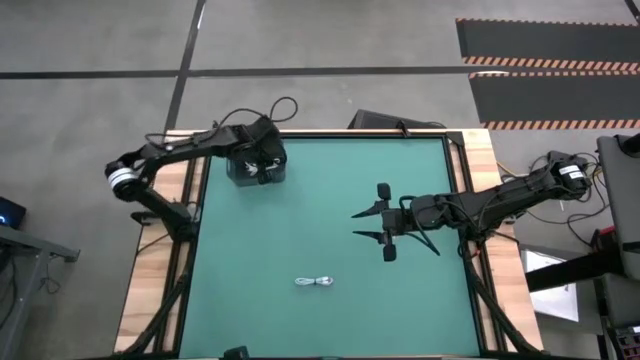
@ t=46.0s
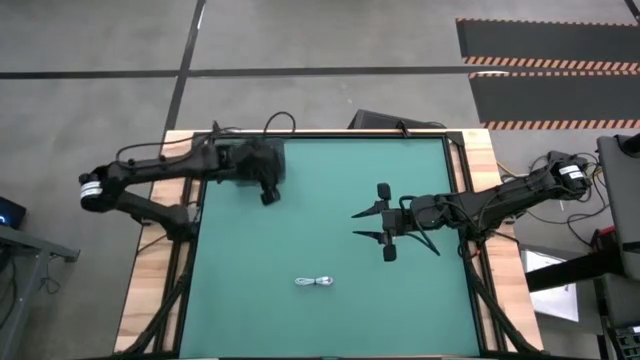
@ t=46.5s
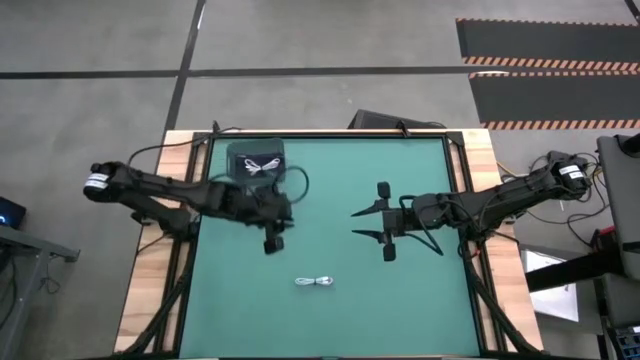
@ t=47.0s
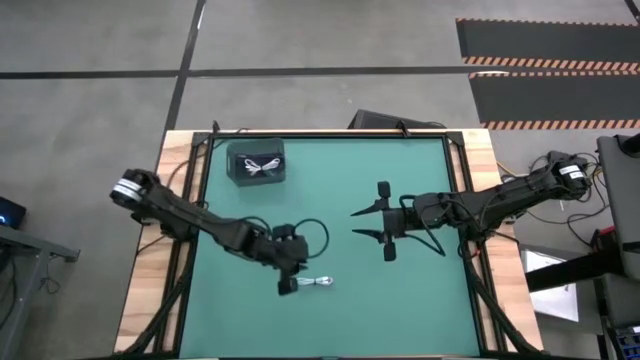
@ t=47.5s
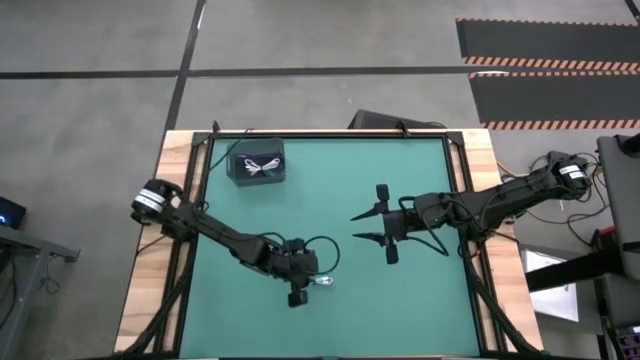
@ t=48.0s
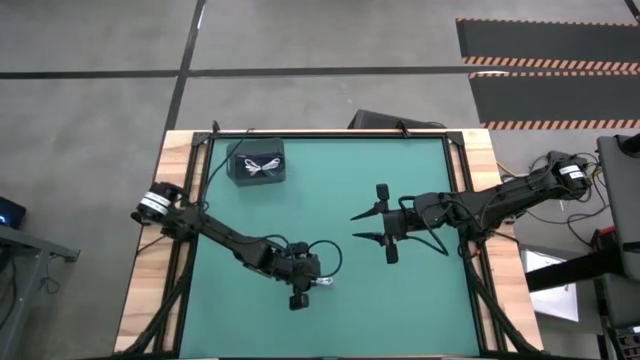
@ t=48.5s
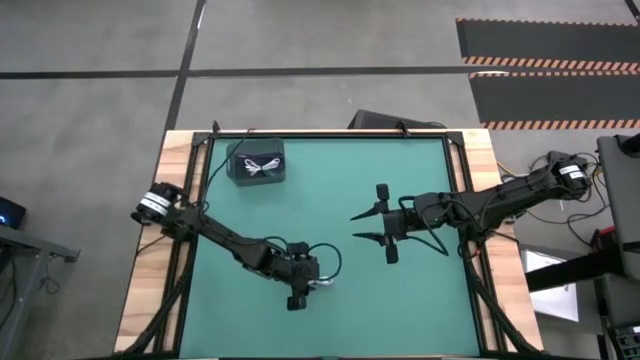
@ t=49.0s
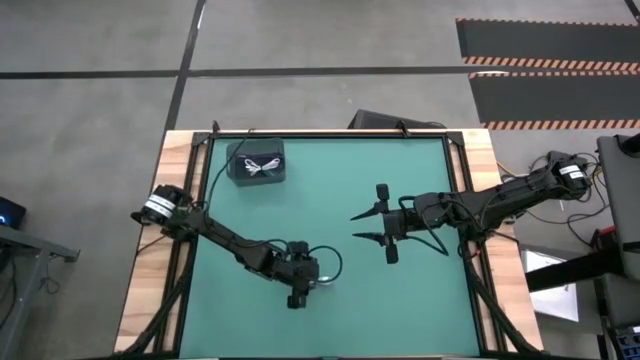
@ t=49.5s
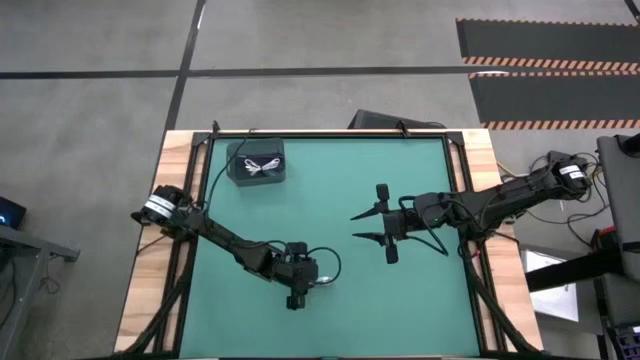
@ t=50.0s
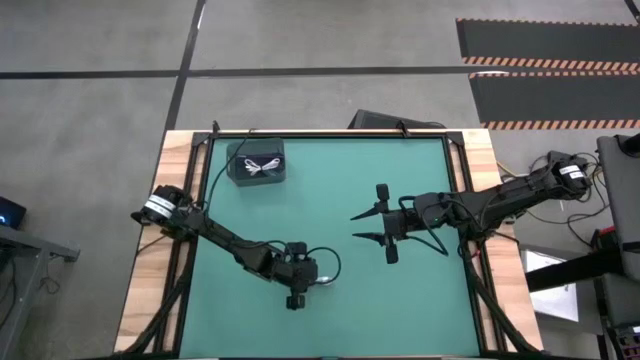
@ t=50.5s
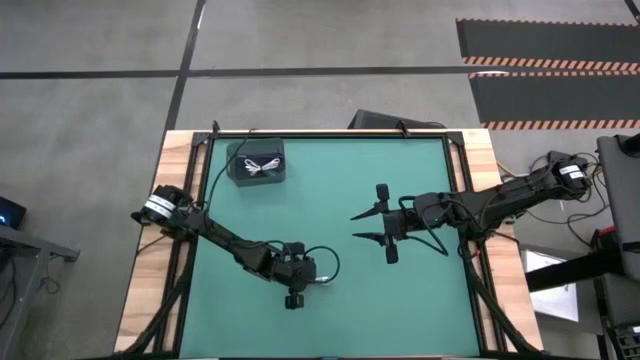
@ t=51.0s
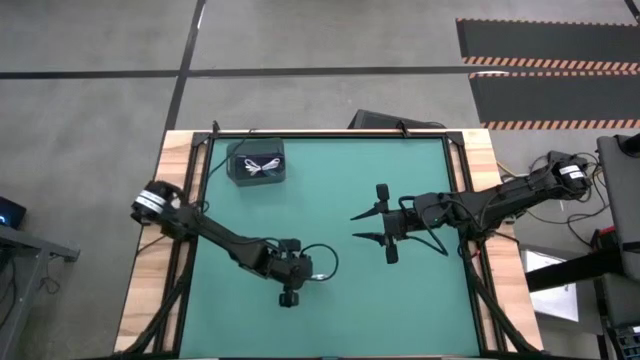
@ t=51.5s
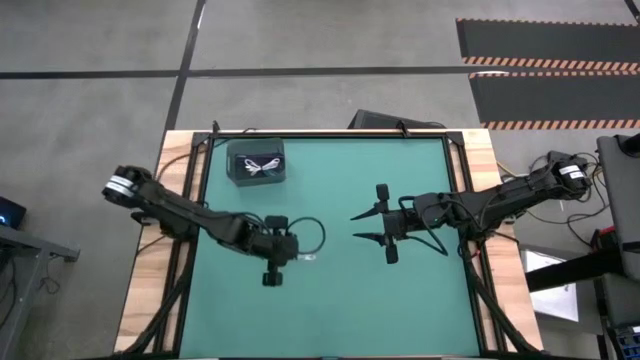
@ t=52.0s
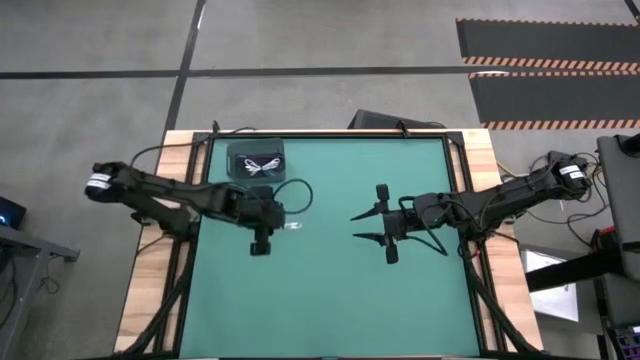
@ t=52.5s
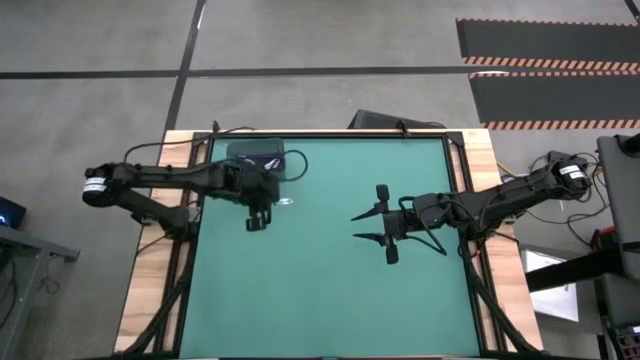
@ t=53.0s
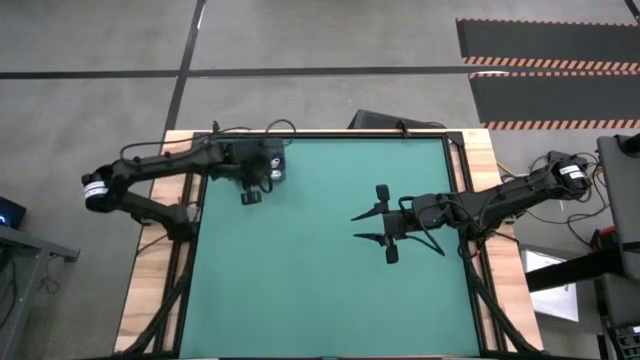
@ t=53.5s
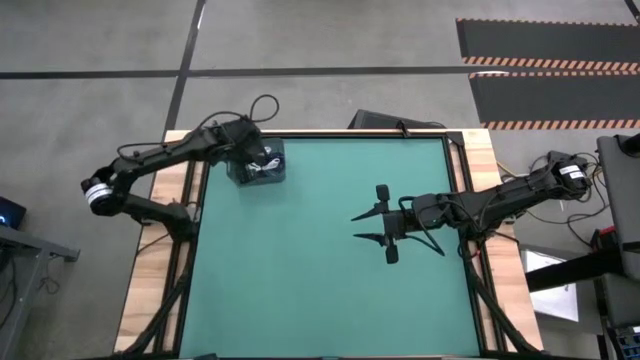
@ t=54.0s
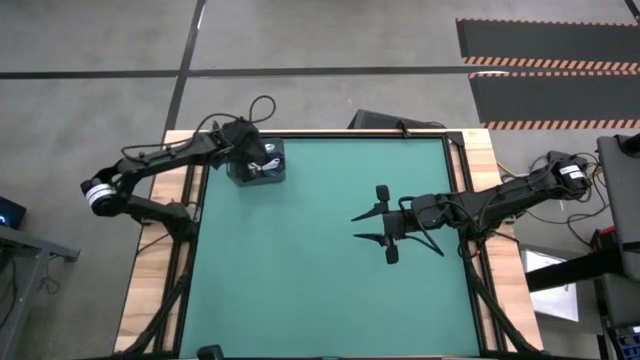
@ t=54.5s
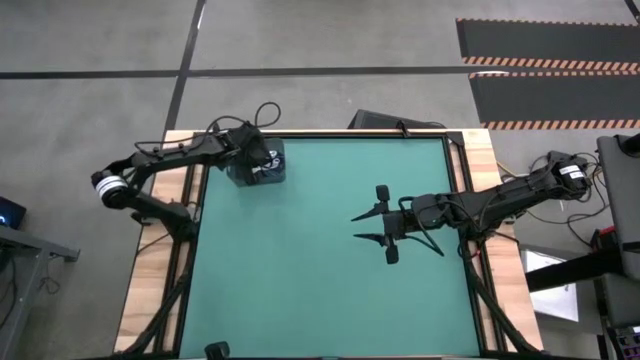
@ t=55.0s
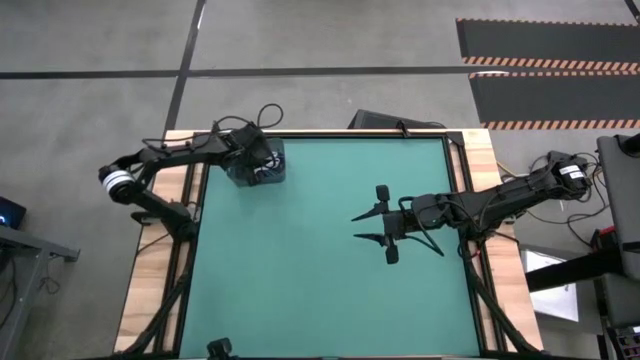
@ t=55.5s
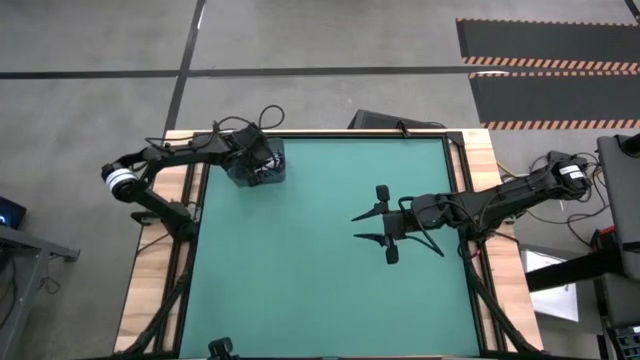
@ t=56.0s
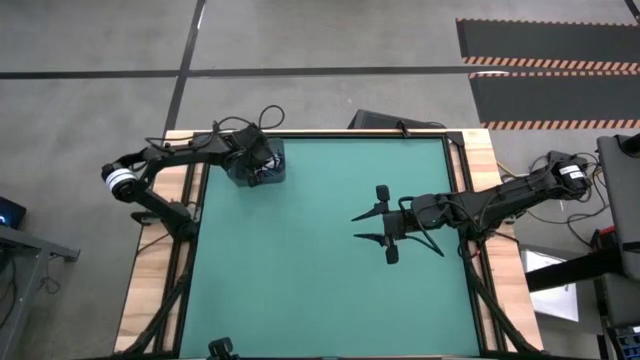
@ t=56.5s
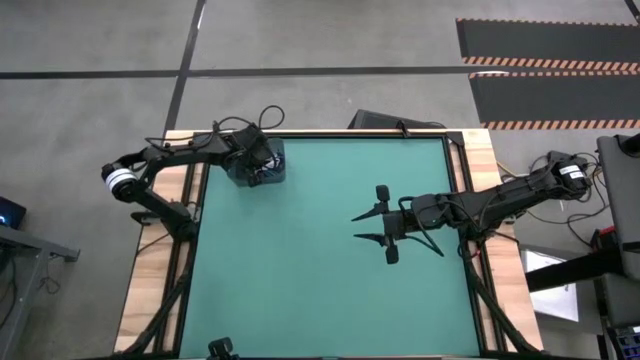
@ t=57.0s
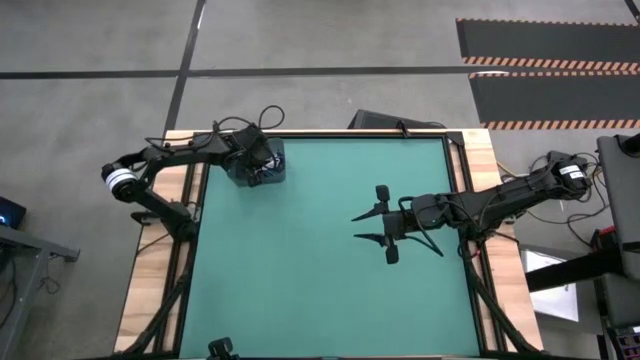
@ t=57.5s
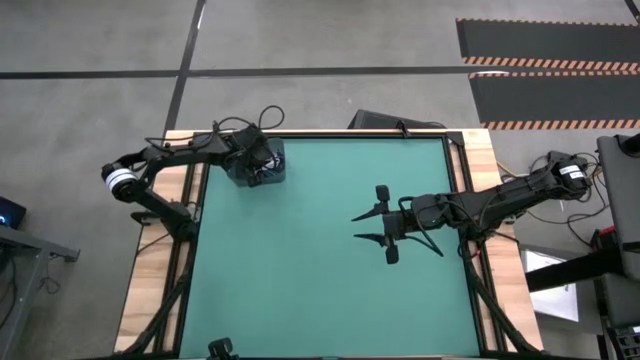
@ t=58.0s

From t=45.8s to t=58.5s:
Task: Pick and place USB-C Cables
Put the white charger cable into the black bin

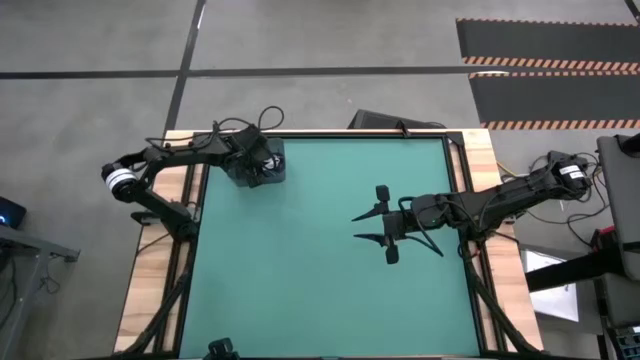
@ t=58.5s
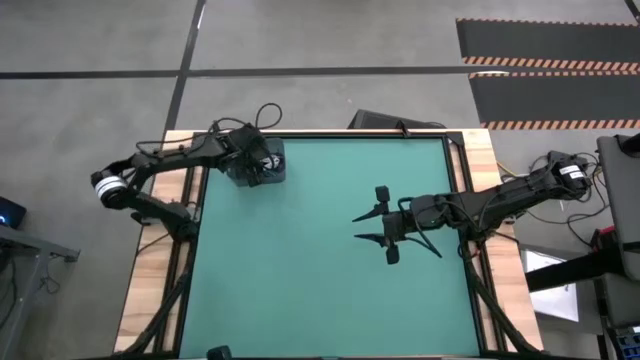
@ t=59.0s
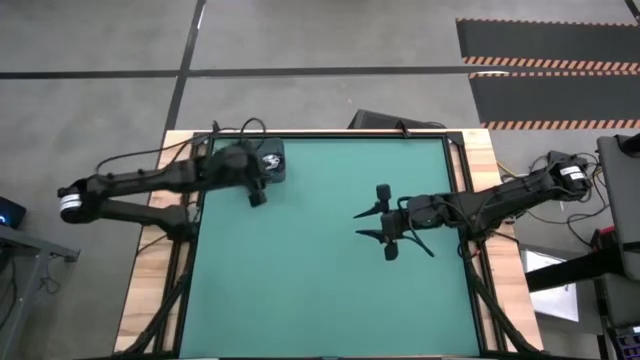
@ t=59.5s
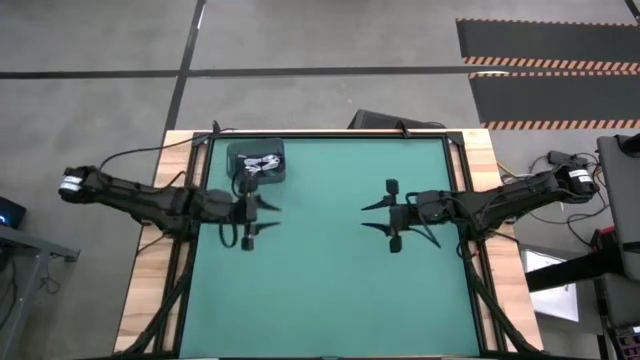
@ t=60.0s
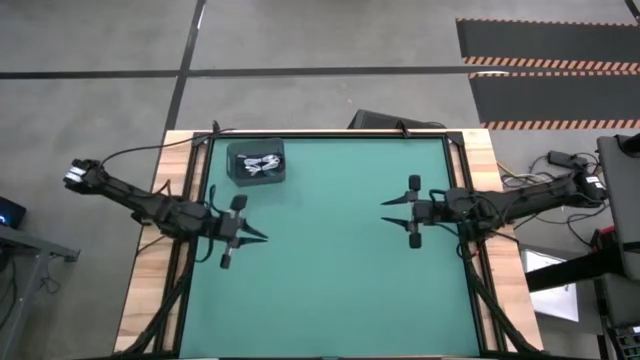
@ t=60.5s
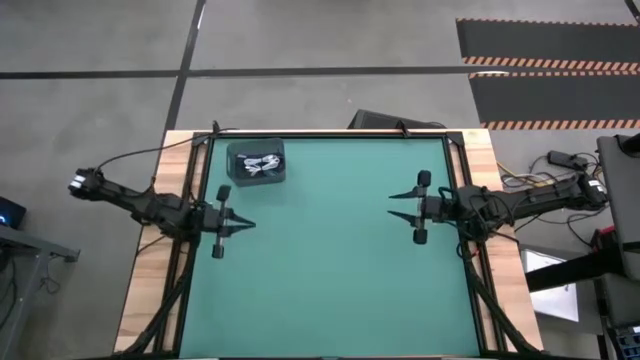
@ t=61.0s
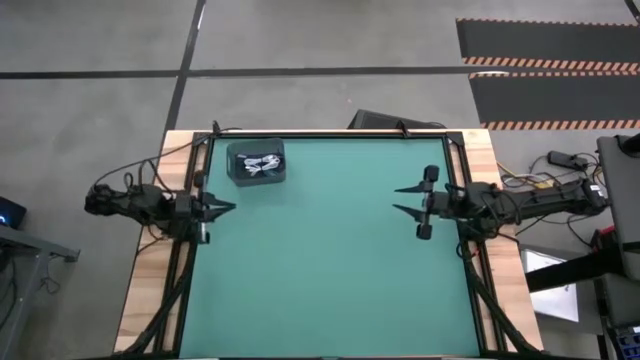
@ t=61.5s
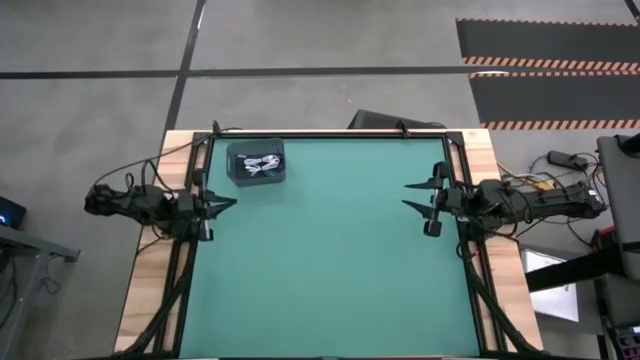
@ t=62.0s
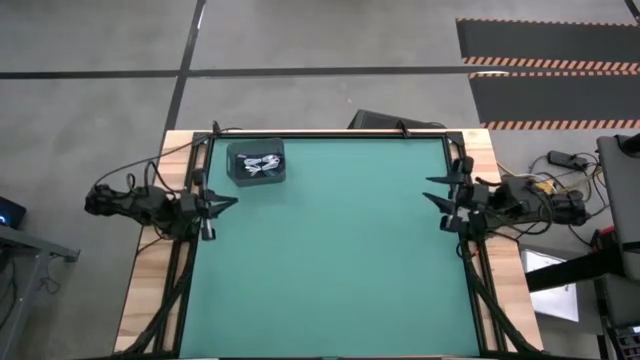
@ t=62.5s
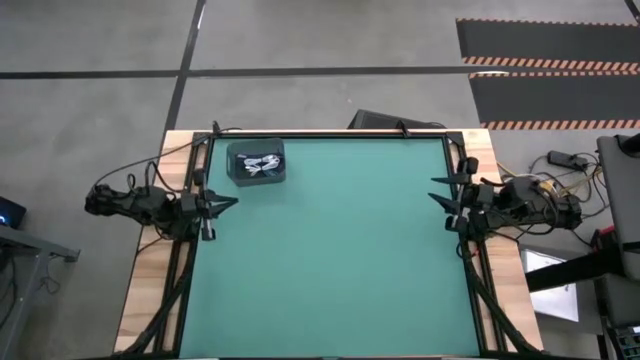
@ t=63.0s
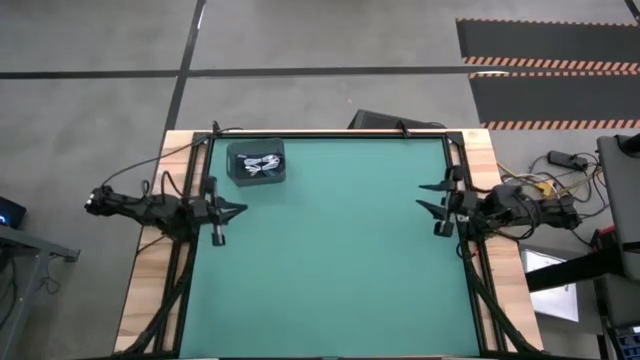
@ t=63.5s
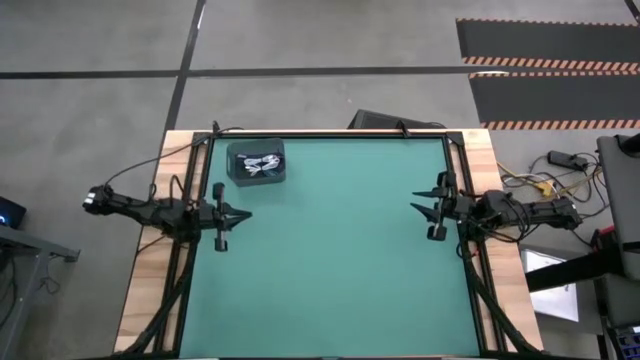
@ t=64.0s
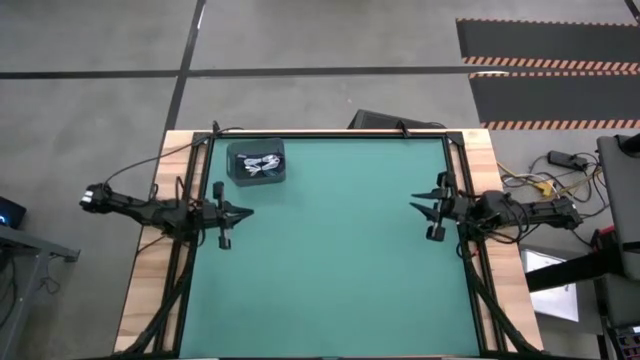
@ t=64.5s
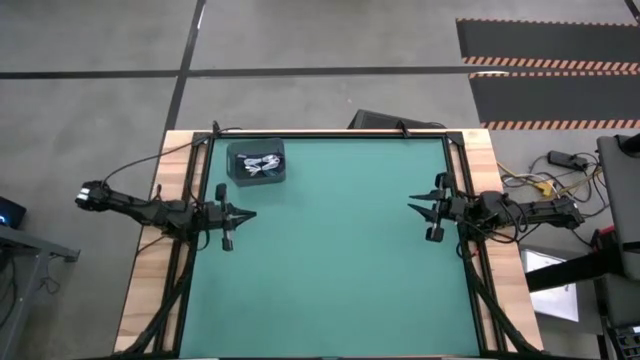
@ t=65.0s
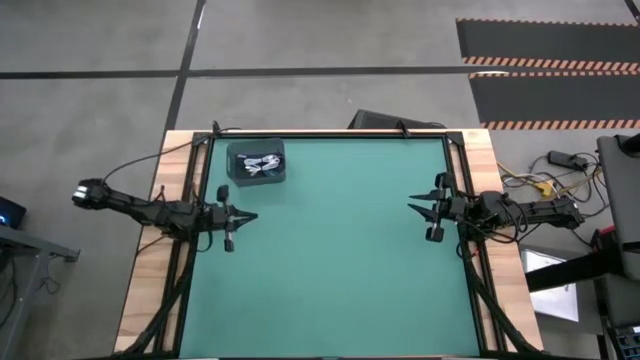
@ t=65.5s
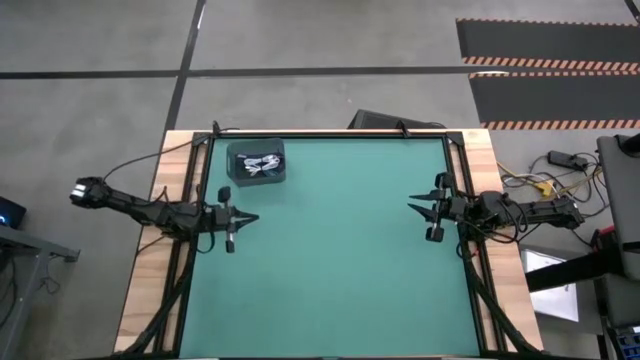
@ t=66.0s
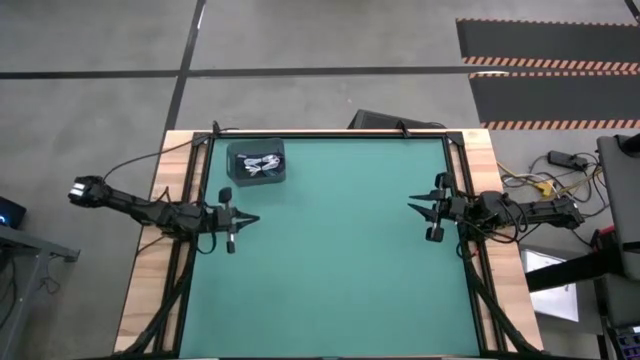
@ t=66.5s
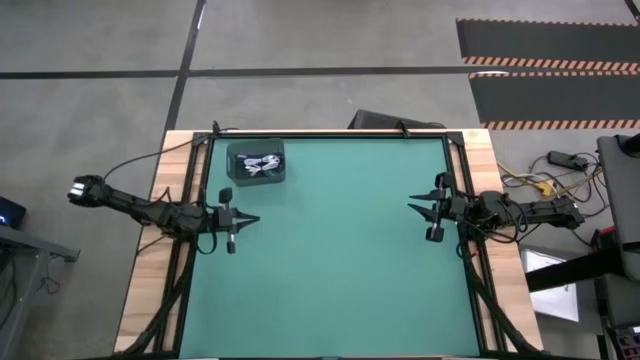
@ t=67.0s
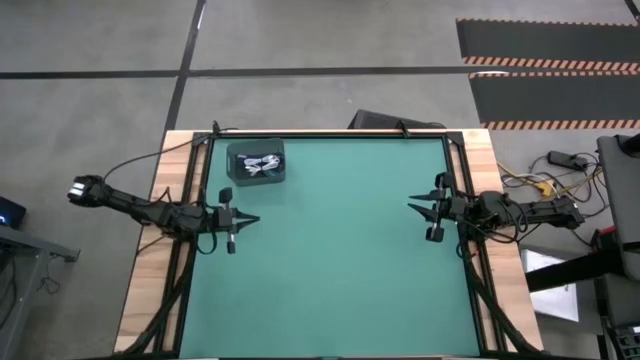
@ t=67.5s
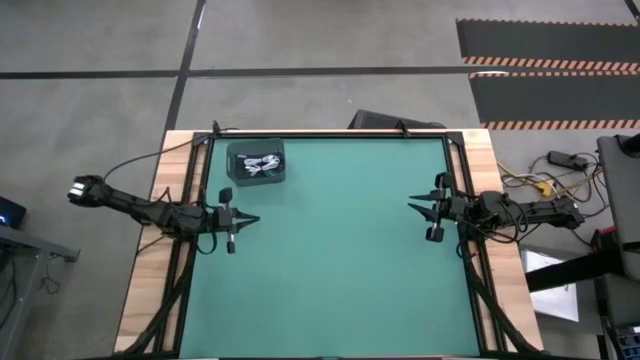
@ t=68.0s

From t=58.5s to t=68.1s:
Return to Home Position
